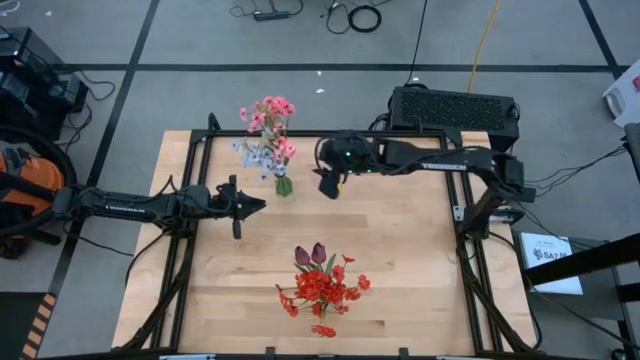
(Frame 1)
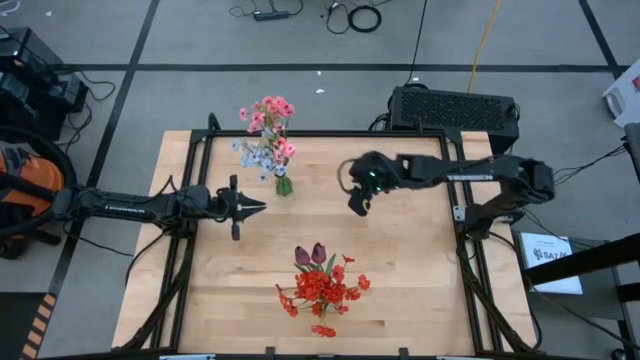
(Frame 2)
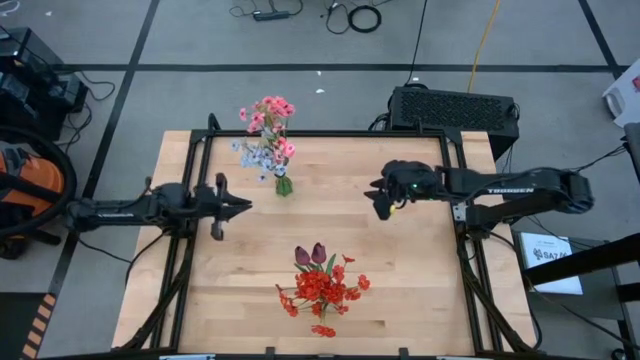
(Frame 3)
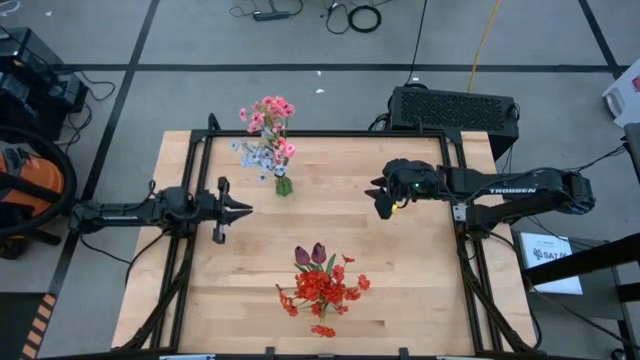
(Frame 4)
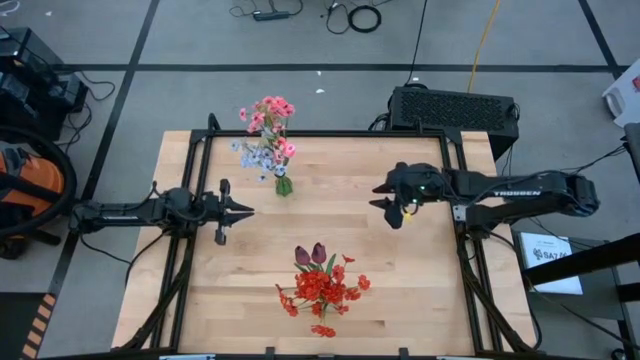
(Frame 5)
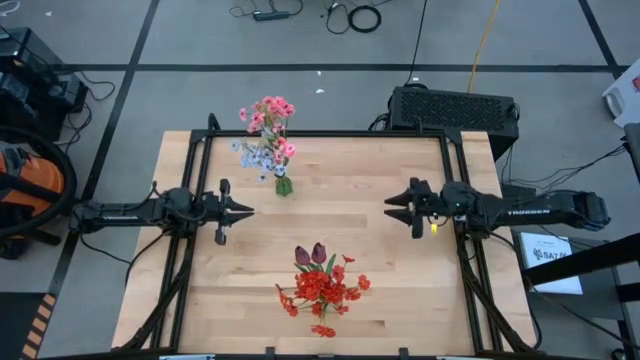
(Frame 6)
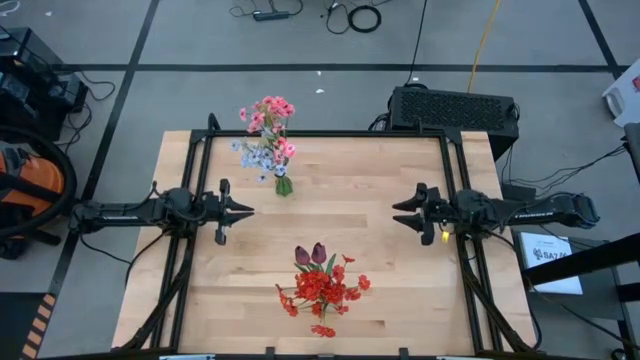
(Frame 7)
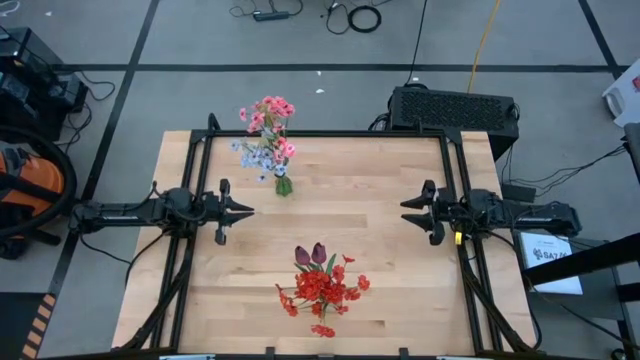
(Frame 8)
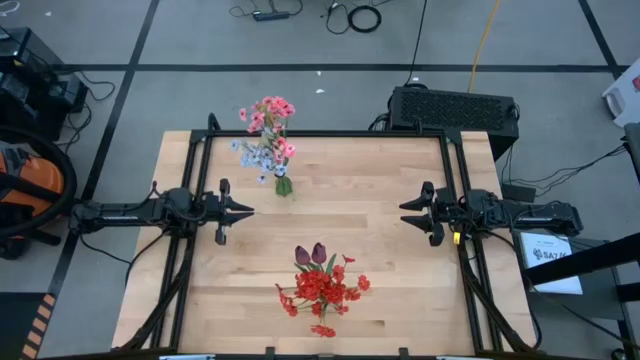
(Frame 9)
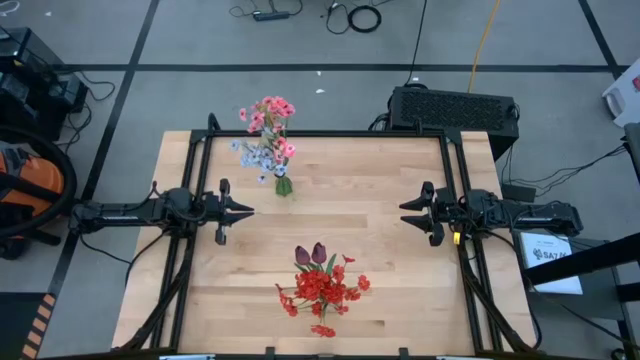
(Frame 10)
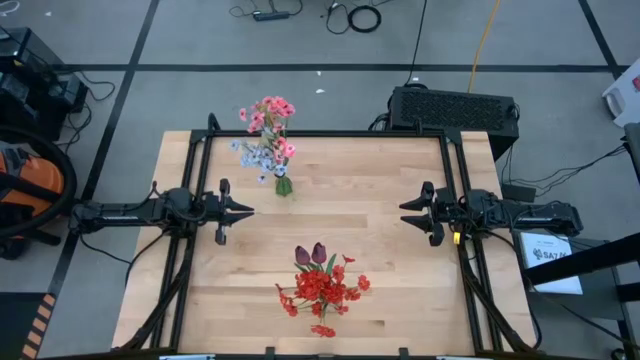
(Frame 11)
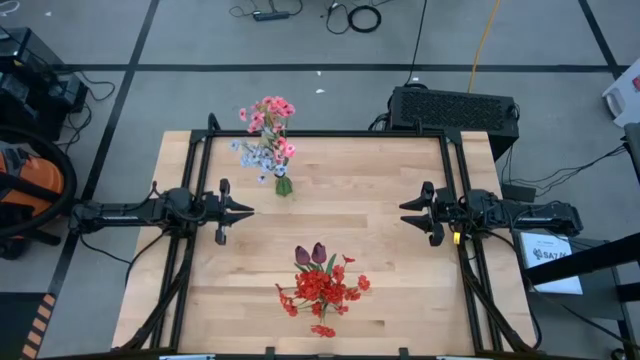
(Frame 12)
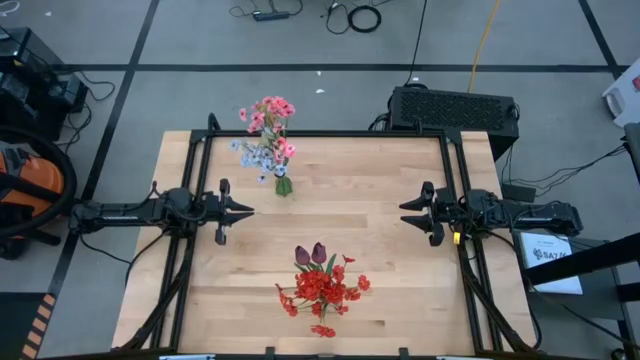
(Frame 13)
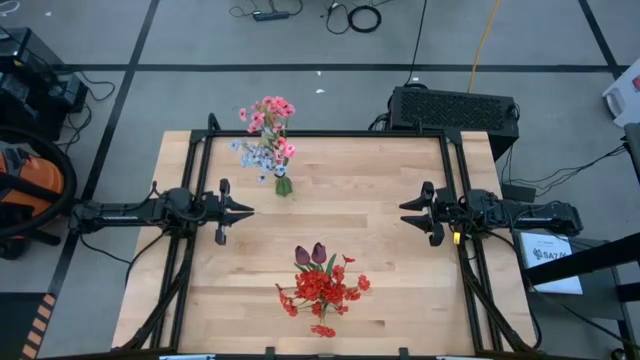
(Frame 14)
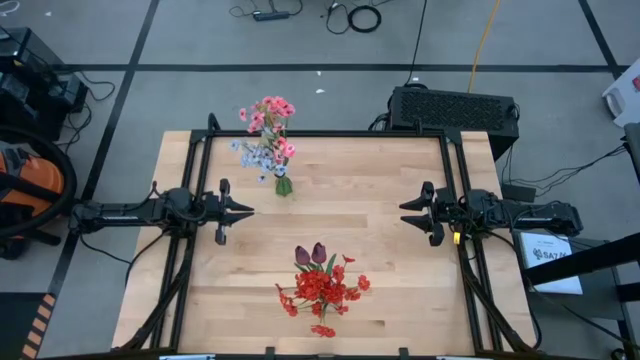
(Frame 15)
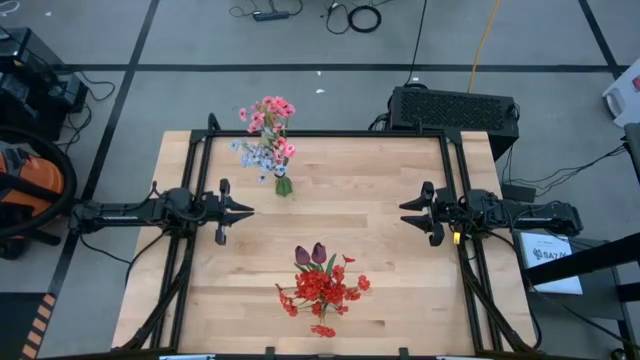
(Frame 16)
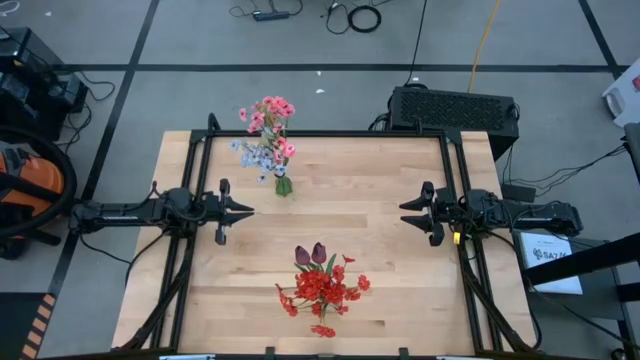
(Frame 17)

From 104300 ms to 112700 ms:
Task: Sort flowers into vase by color
Return to Home Position

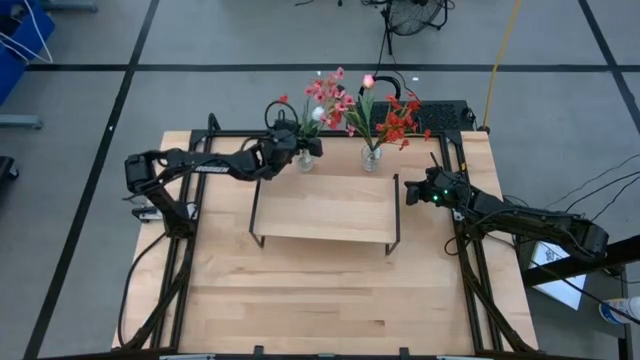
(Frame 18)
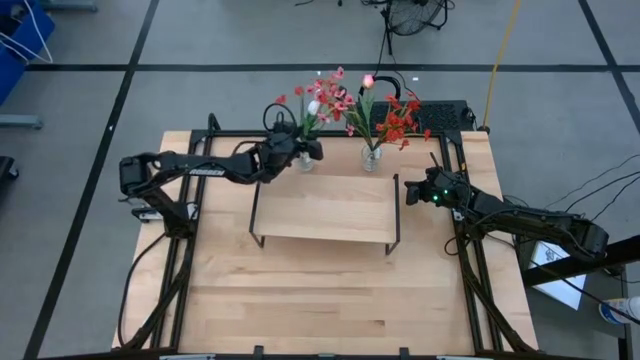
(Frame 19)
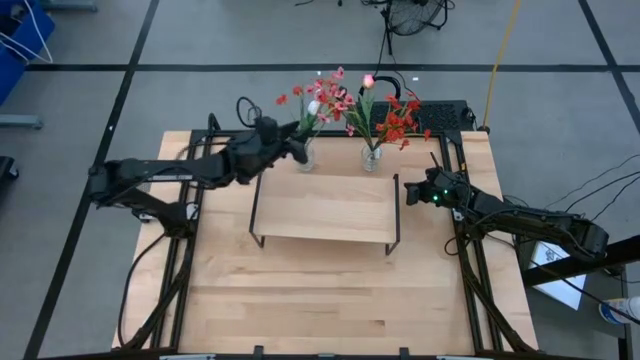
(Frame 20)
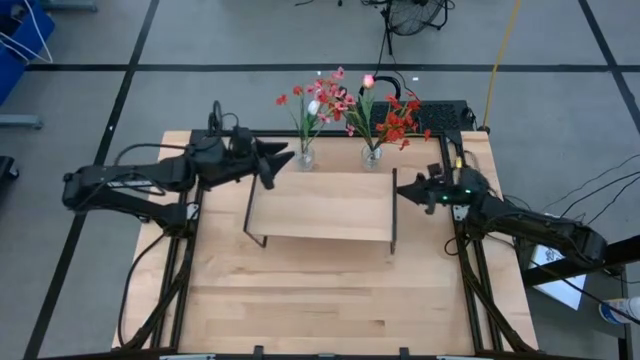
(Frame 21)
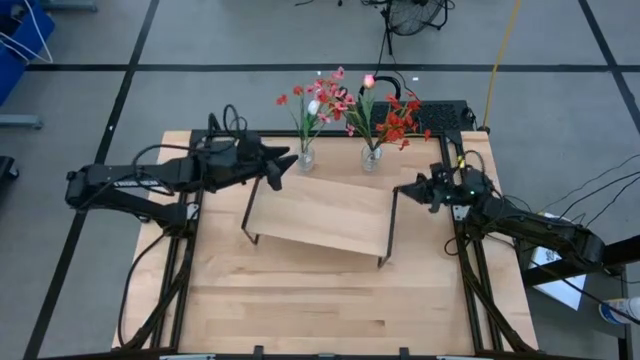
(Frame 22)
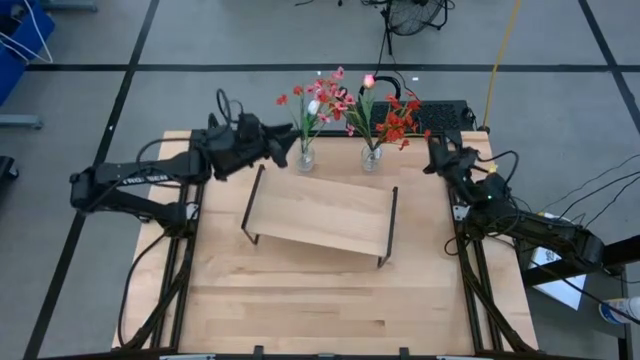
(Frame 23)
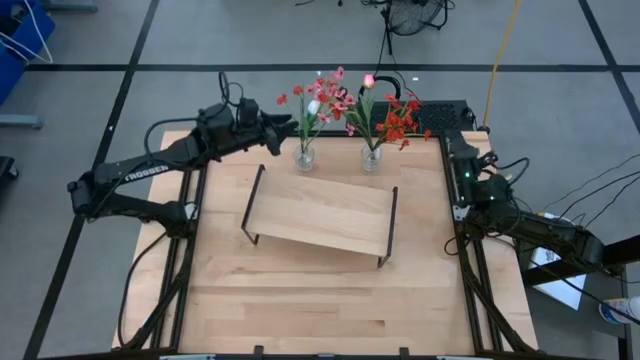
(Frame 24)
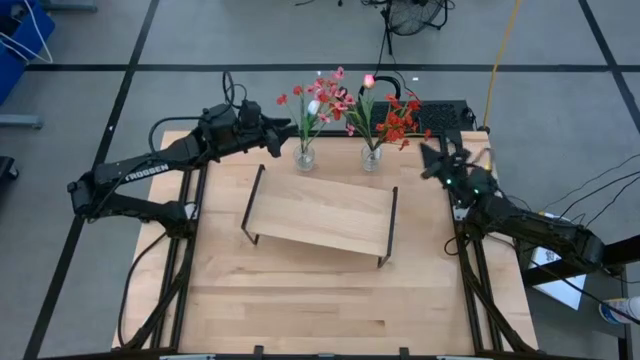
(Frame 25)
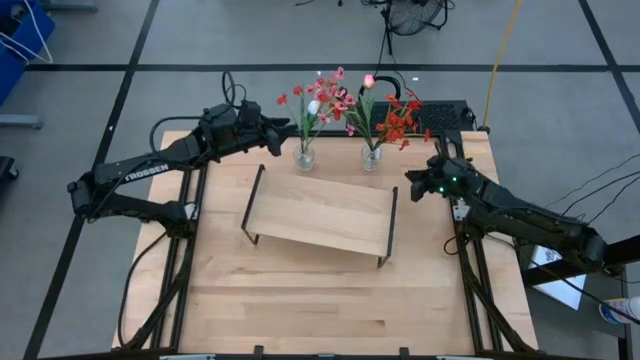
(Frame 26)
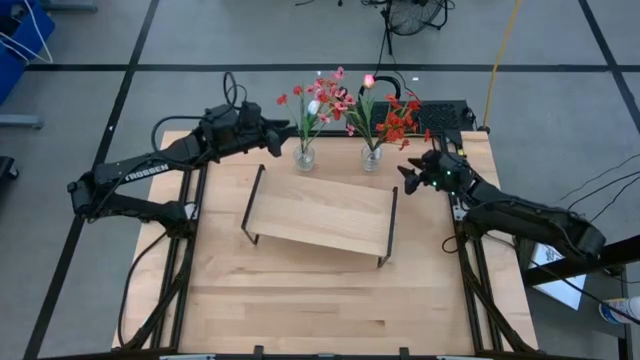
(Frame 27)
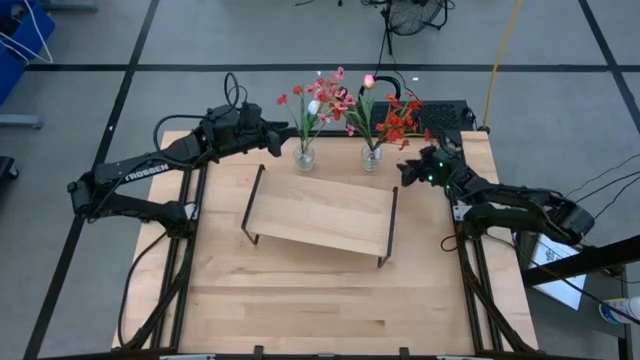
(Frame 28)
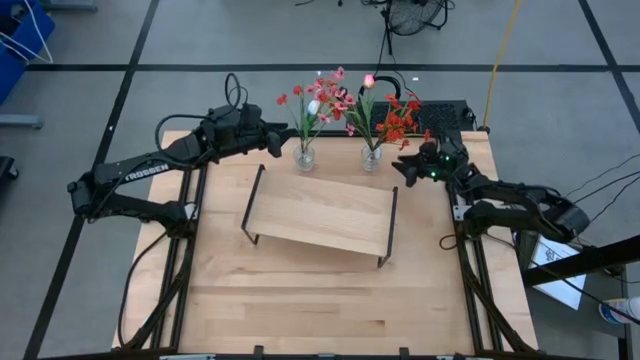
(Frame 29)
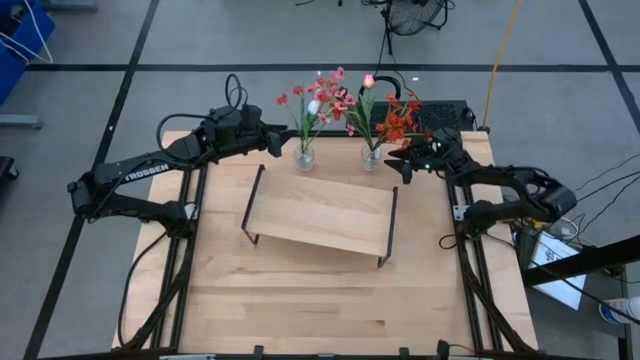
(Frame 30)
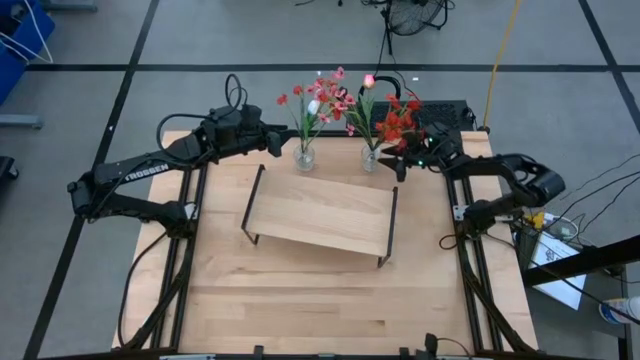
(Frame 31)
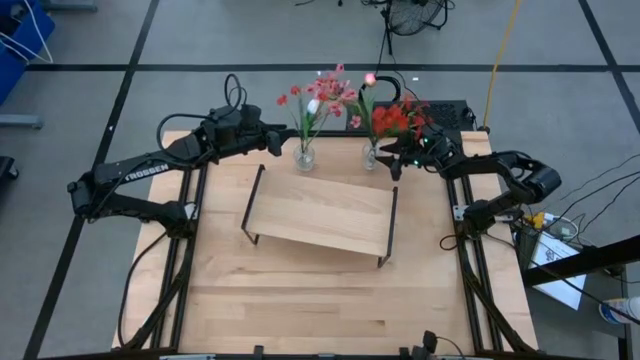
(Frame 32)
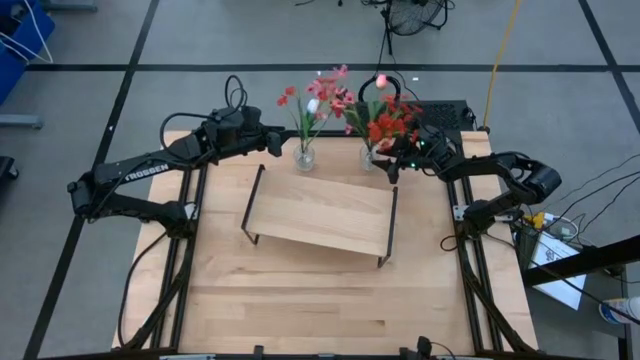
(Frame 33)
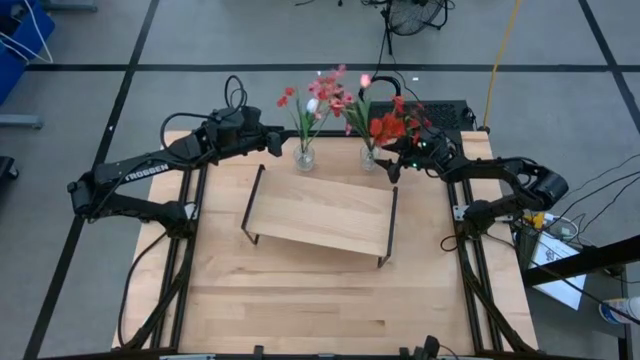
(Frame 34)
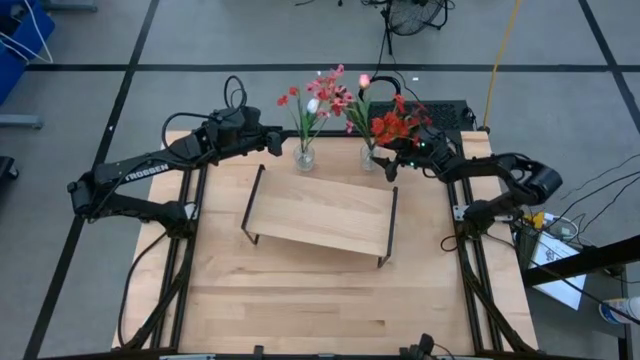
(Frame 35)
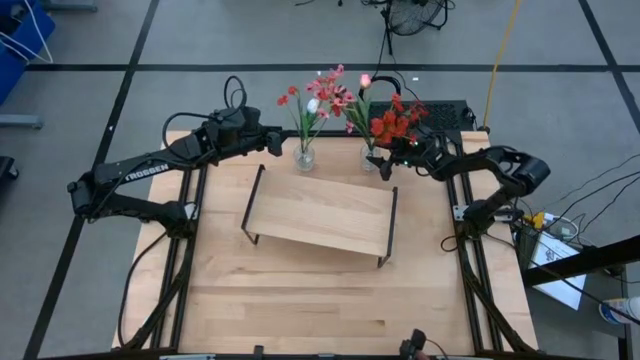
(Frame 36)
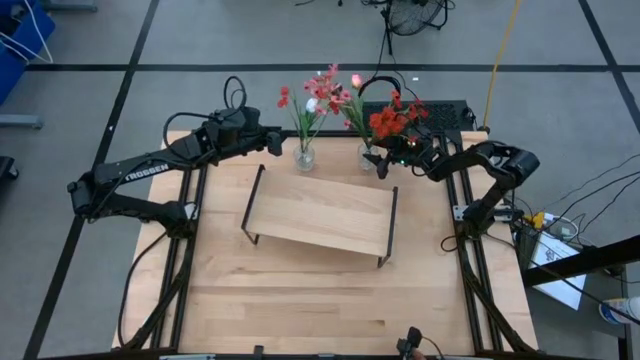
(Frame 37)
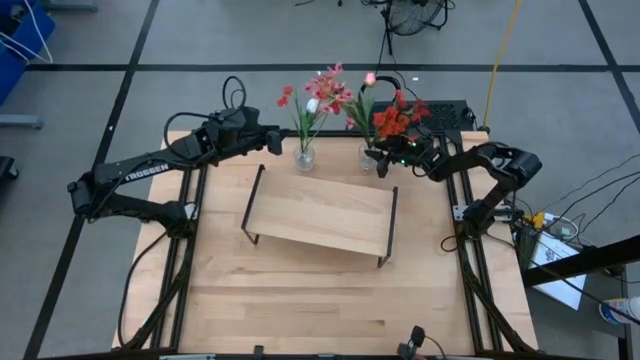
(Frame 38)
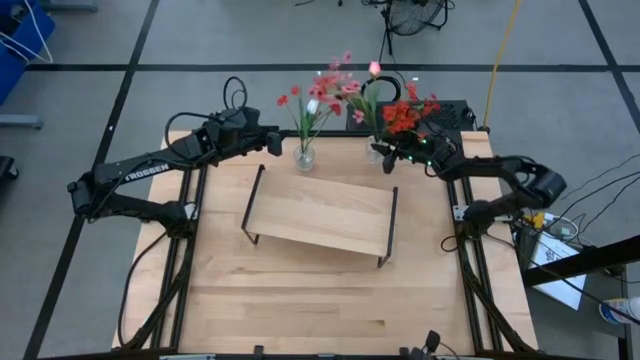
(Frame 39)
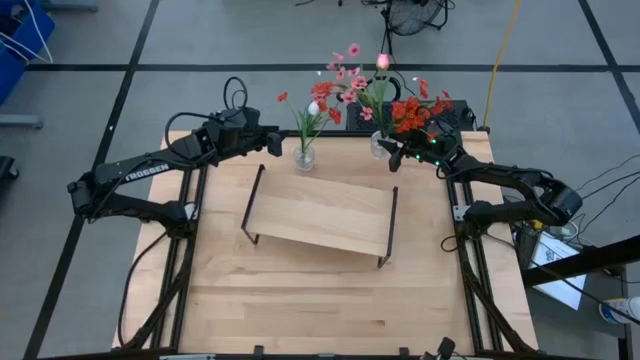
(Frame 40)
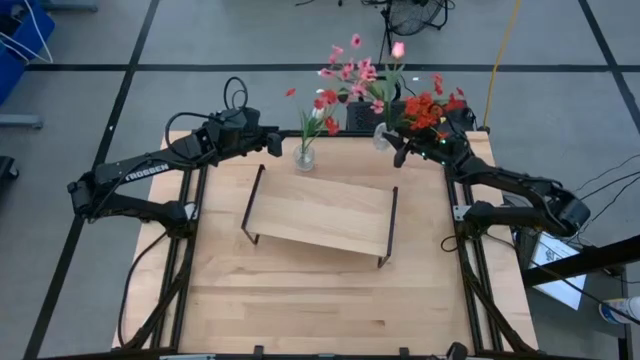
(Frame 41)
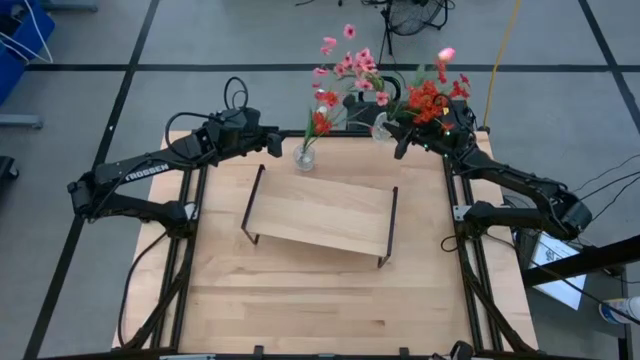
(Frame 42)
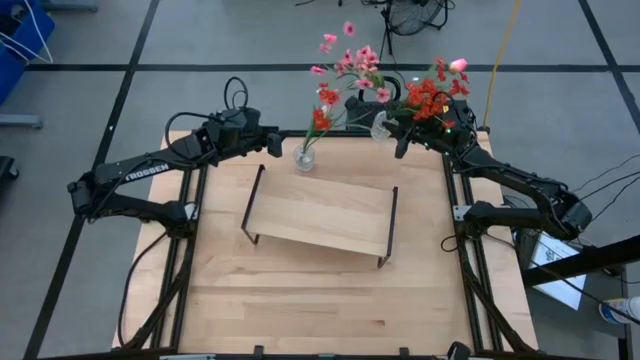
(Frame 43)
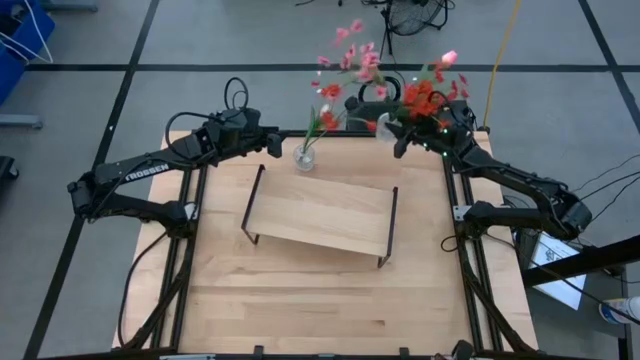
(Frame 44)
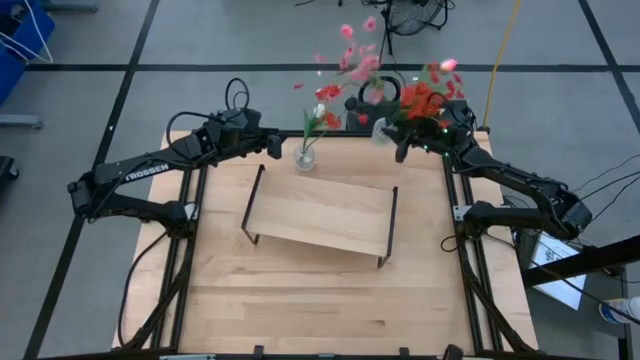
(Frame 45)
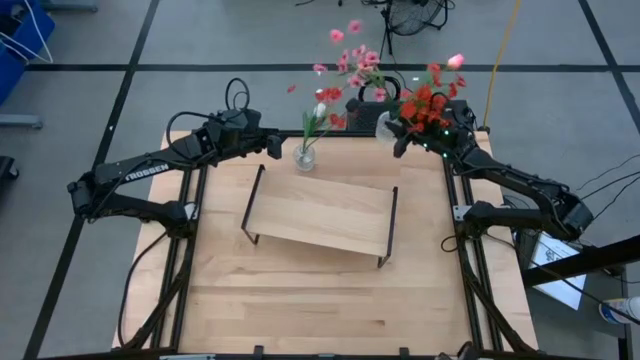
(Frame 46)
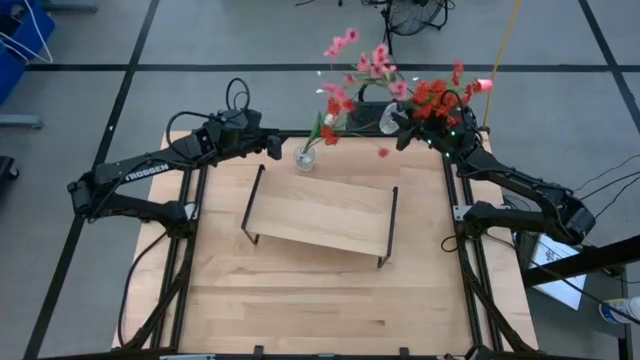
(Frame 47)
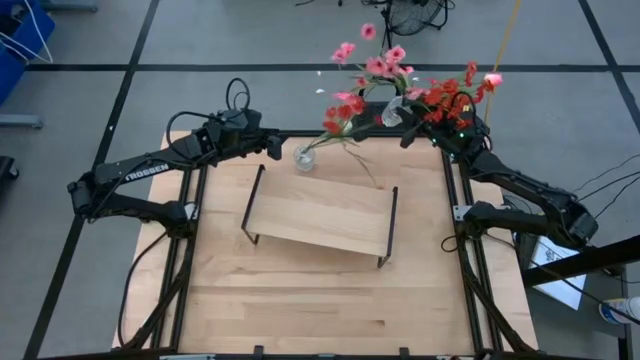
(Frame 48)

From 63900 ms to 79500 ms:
Task: Pick and place flowers into a vace then onto a shelf
Put the right transparent flower vase on the shelf
